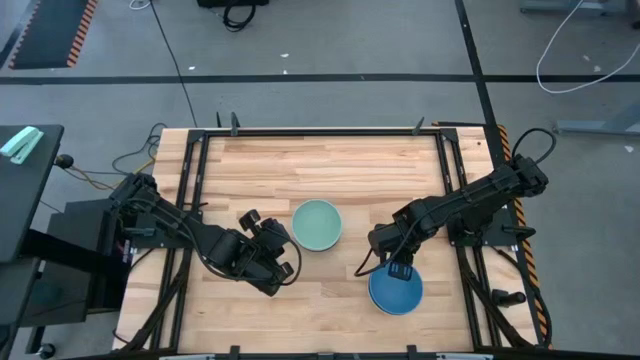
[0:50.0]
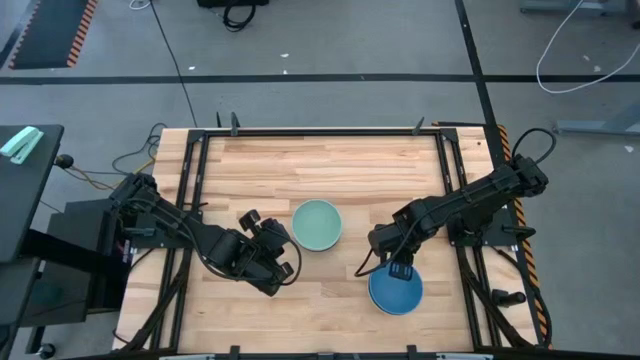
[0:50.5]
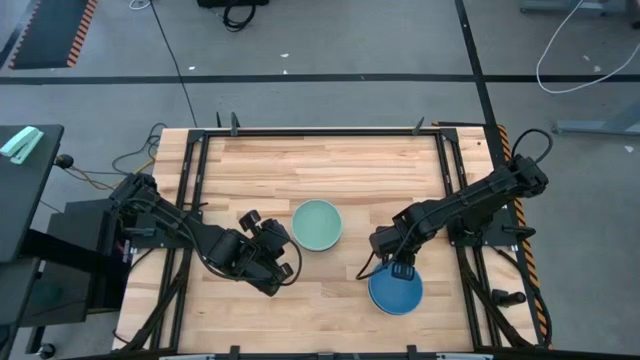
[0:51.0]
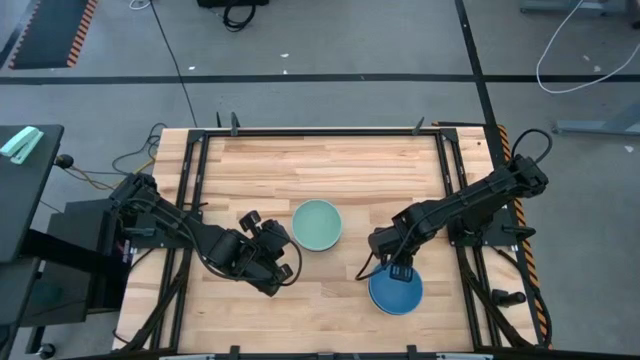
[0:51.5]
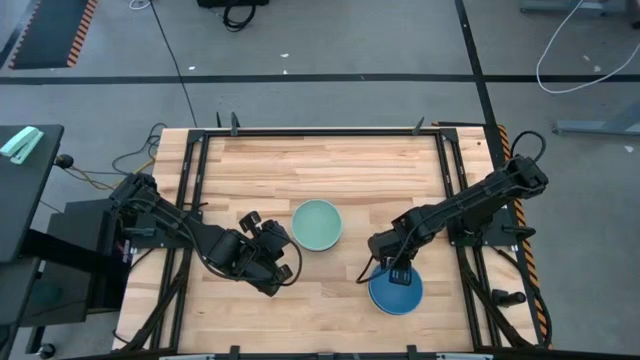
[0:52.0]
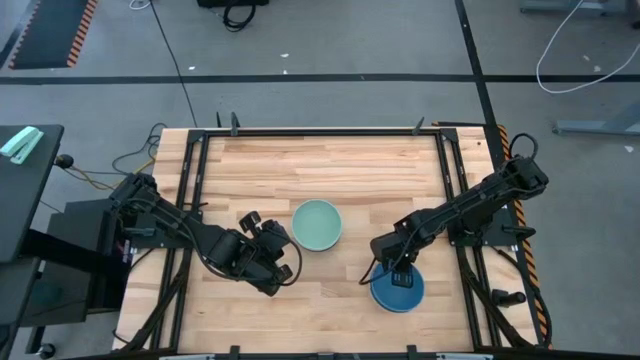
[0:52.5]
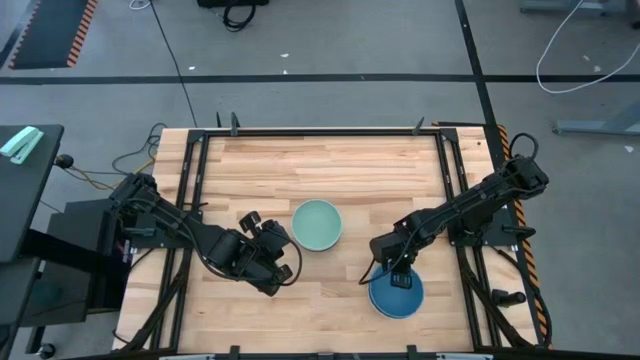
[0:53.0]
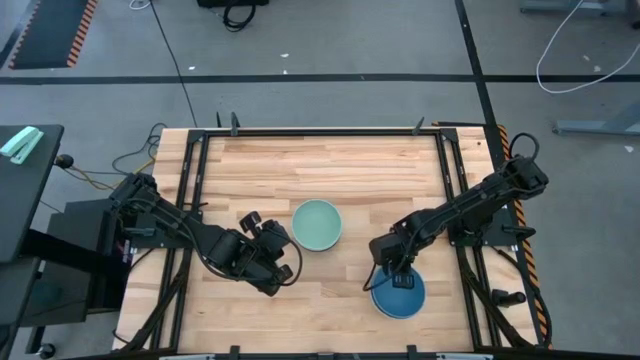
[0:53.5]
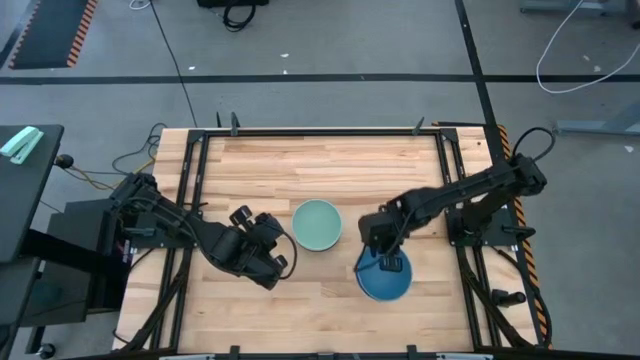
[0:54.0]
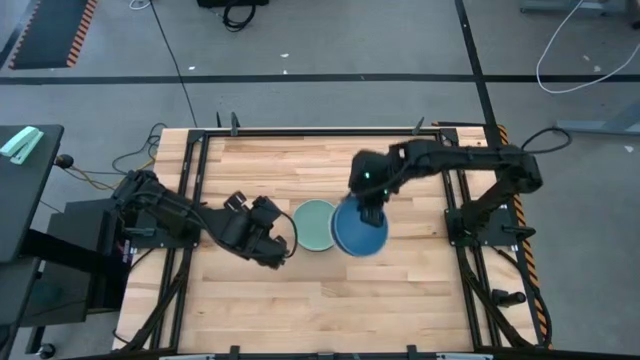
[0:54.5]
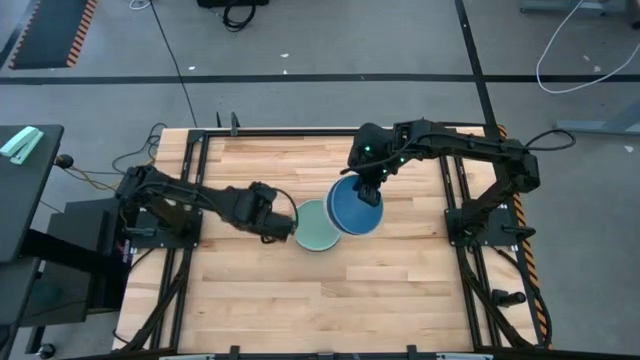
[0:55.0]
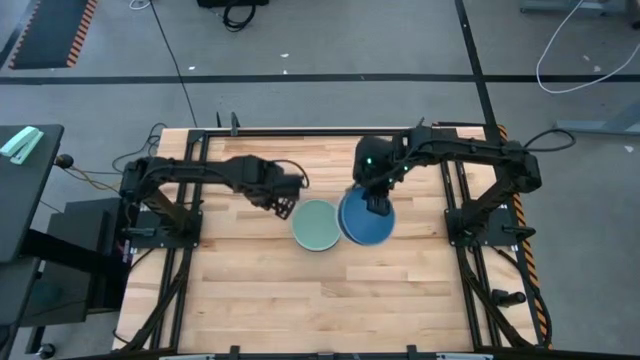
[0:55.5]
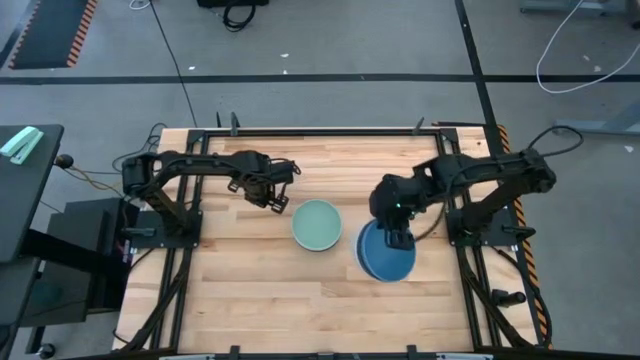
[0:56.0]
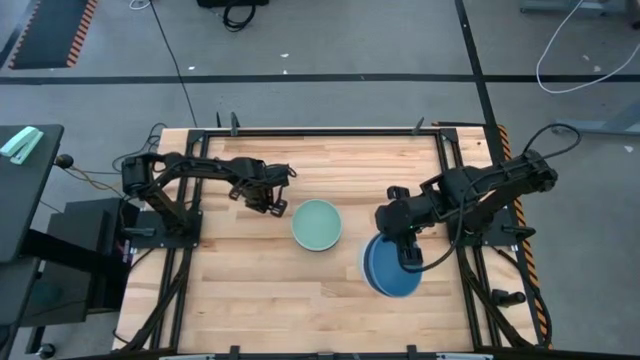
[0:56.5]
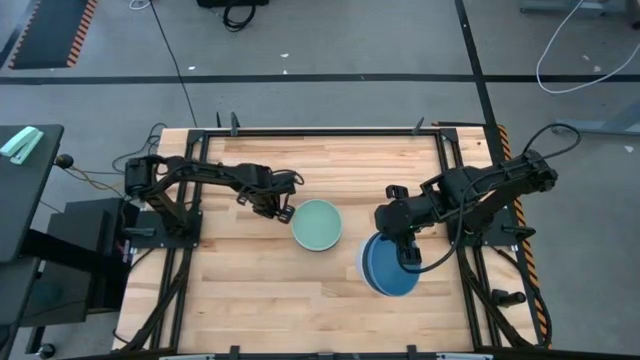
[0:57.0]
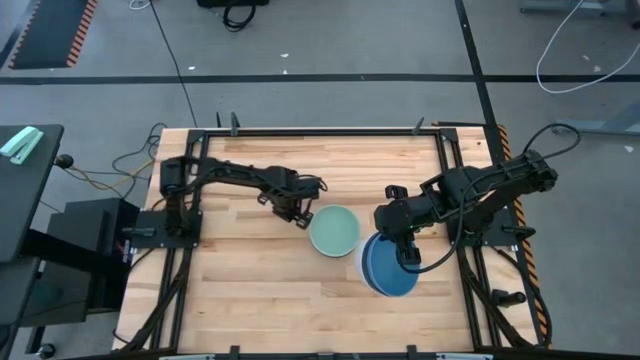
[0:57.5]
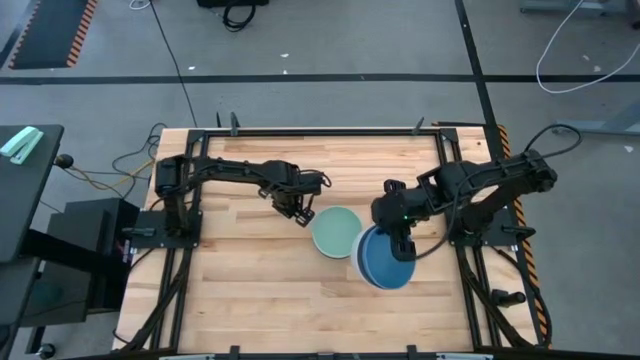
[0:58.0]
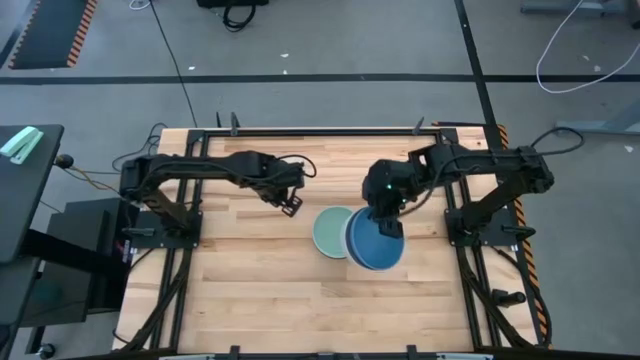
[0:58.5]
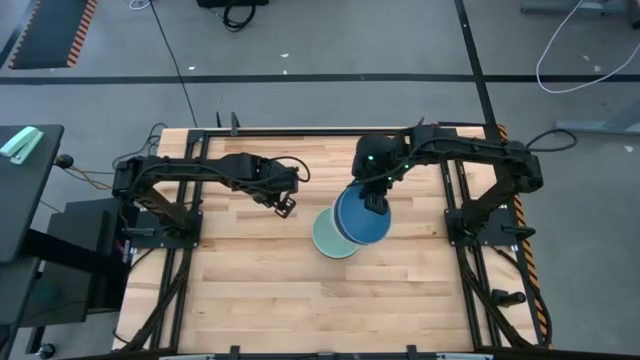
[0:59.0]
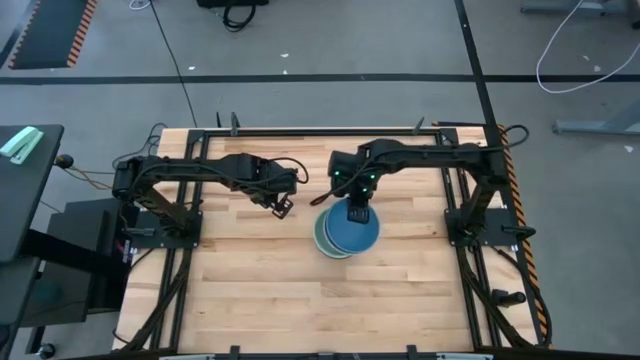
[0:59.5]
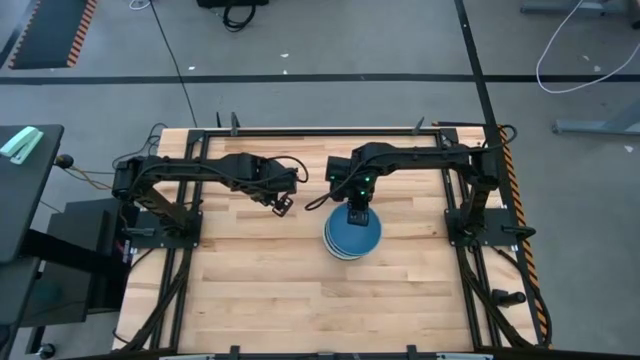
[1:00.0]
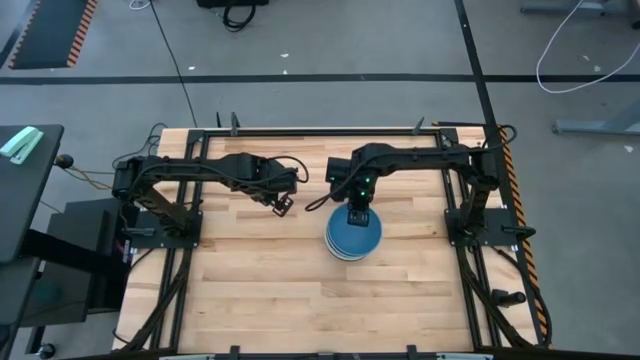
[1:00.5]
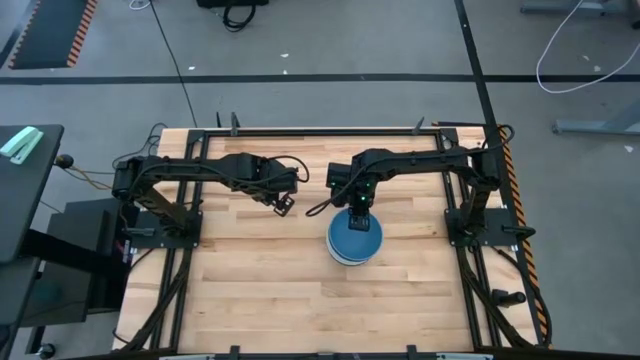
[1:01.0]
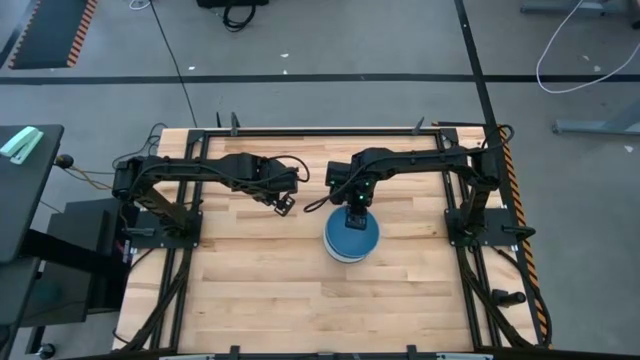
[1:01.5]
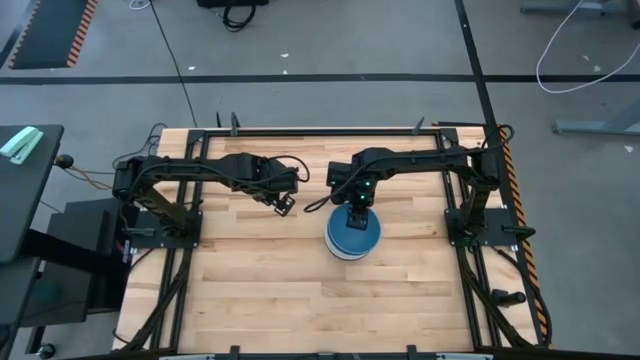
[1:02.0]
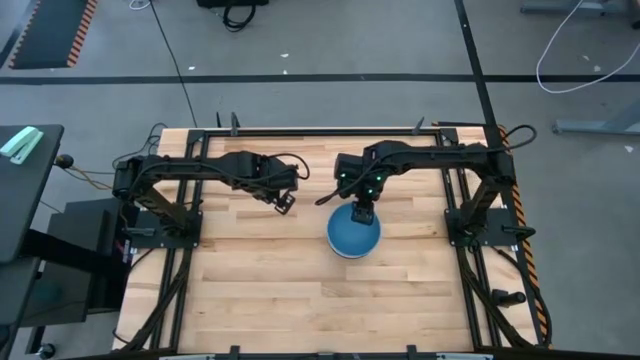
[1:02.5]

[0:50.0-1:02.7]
Task: Nest bowls inside each other
Stack the right stacked bowls on the green bowl

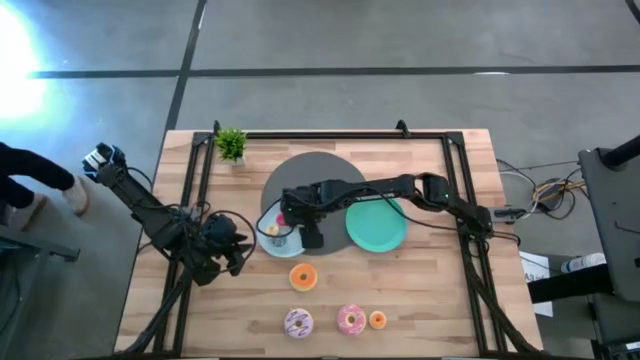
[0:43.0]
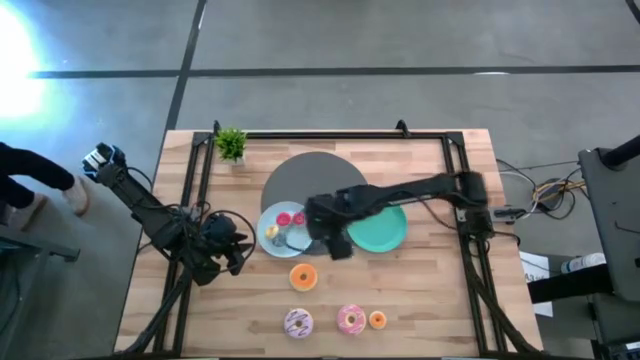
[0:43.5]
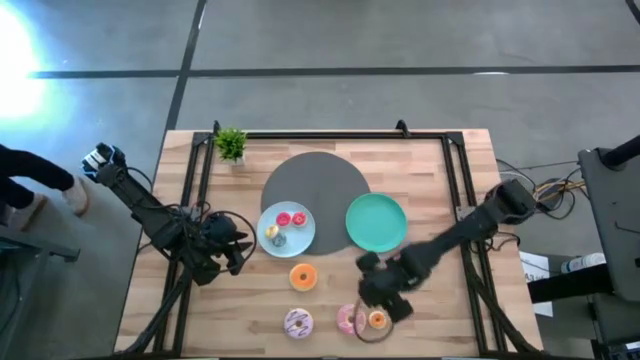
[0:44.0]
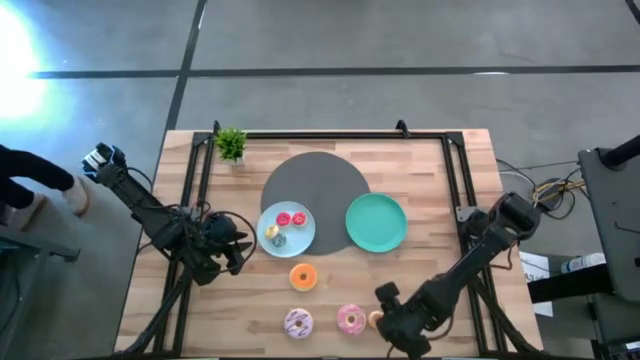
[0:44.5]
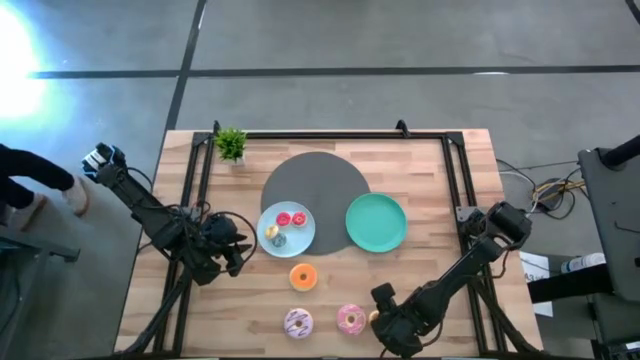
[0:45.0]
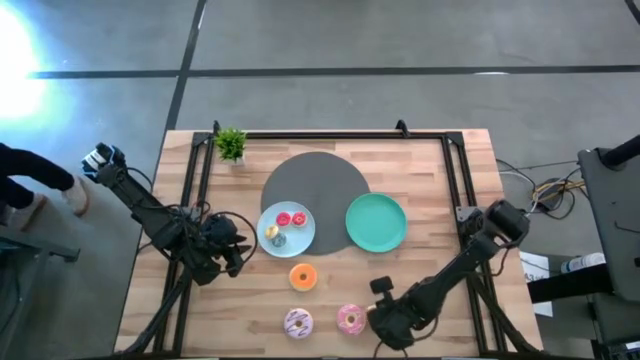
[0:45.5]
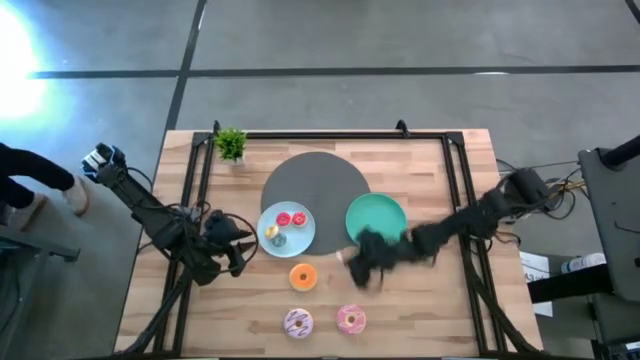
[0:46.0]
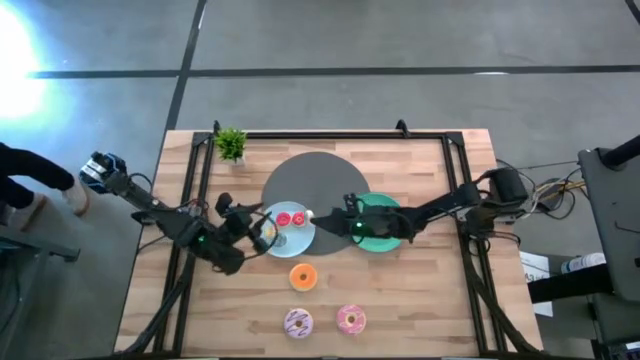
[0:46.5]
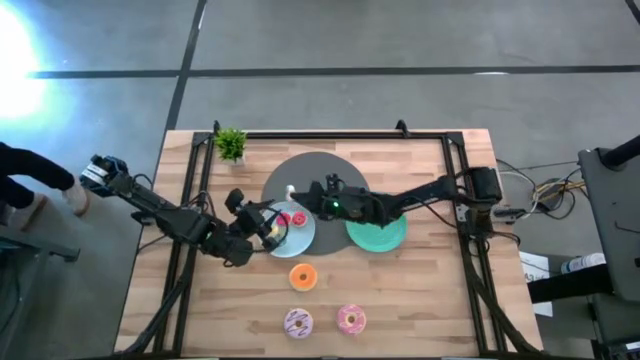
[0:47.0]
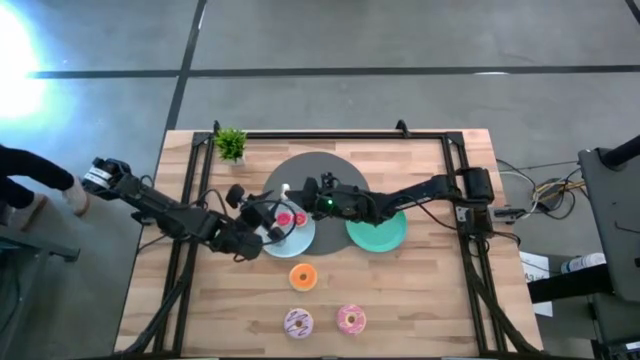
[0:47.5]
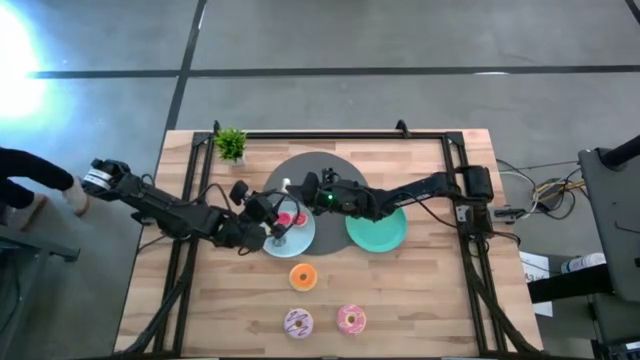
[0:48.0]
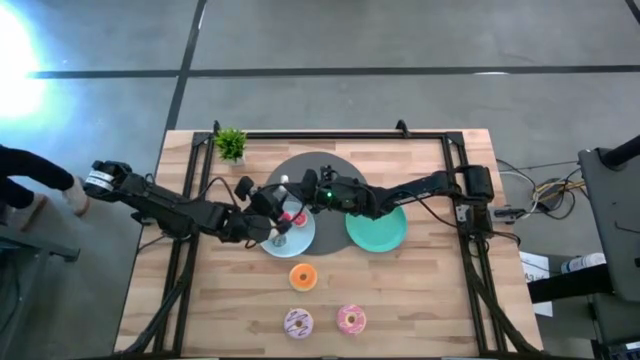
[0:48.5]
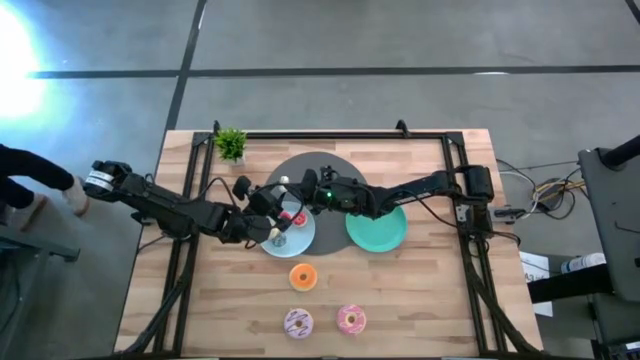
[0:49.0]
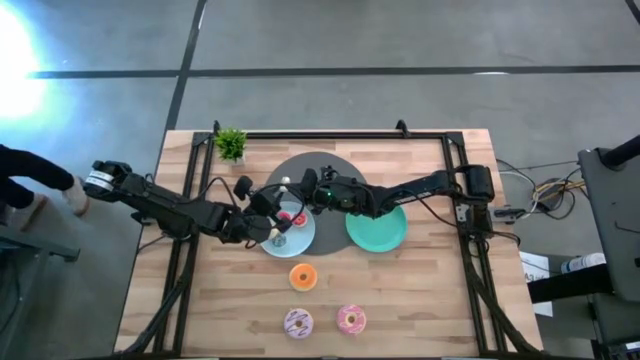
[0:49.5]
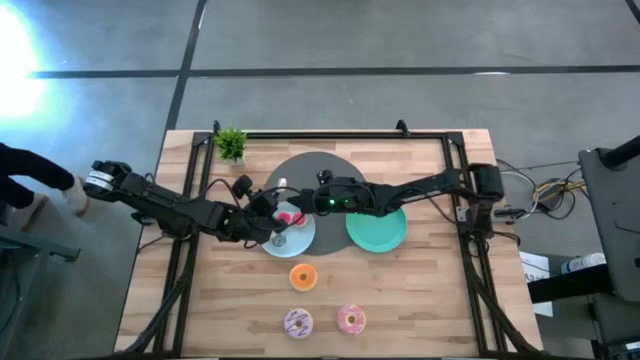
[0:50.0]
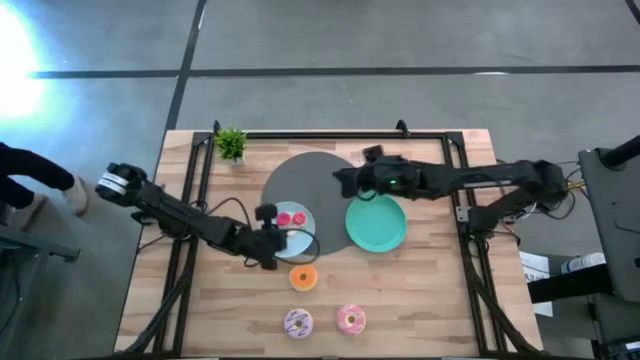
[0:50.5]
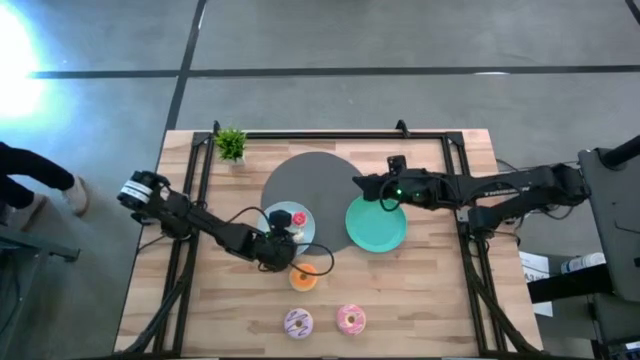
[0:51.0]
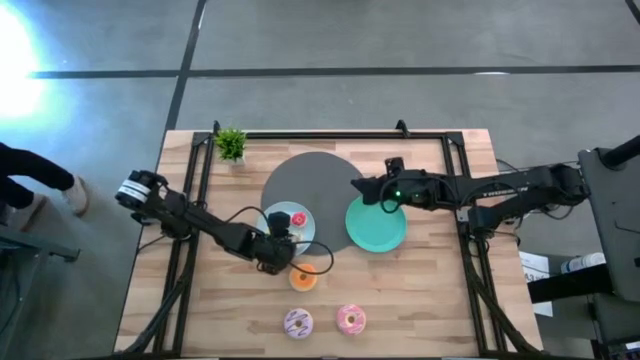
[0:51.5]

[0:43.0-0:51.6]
Task: Pick & Place donuts
Put the small orange donut on the light blue plate
